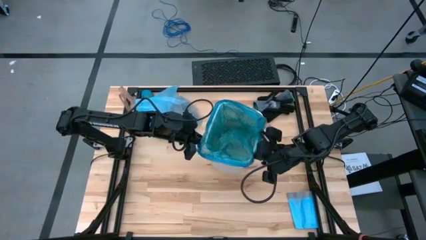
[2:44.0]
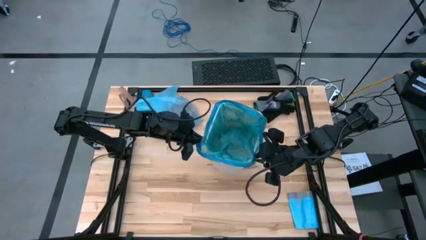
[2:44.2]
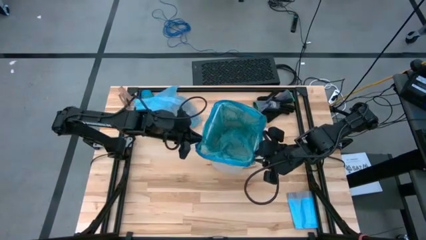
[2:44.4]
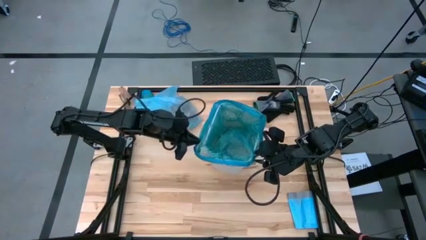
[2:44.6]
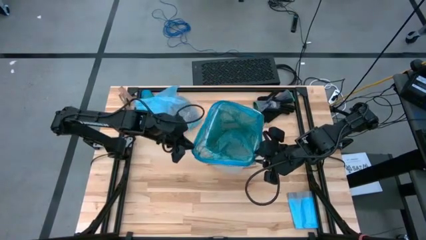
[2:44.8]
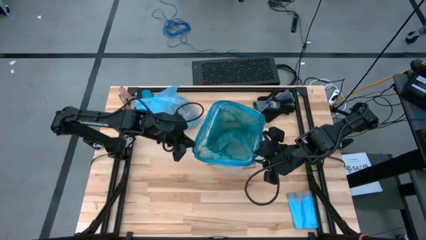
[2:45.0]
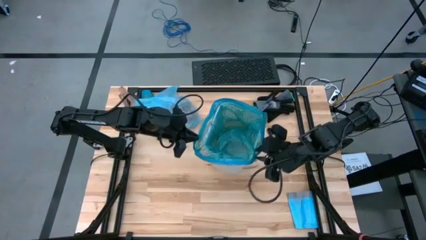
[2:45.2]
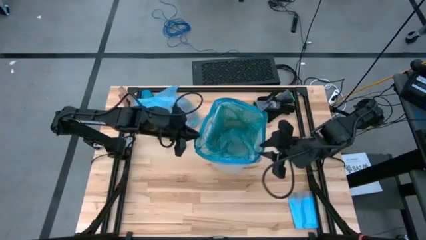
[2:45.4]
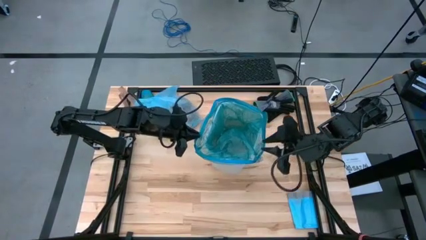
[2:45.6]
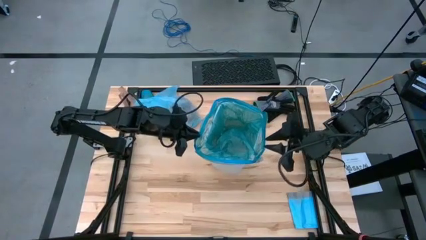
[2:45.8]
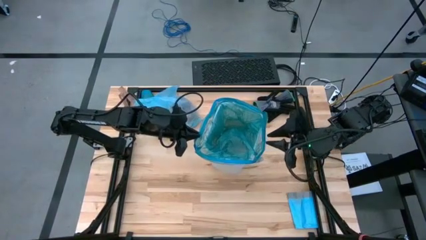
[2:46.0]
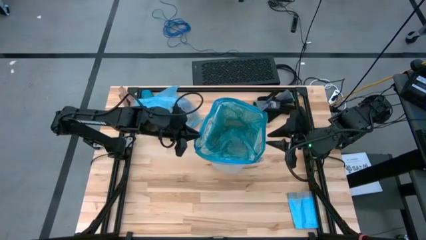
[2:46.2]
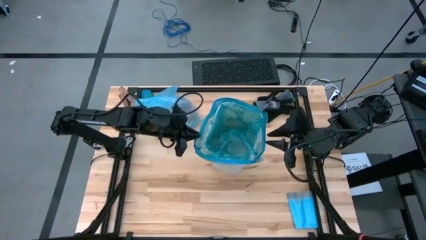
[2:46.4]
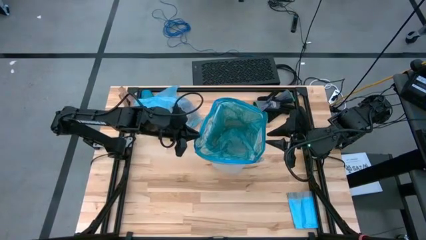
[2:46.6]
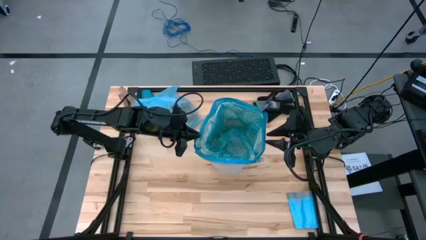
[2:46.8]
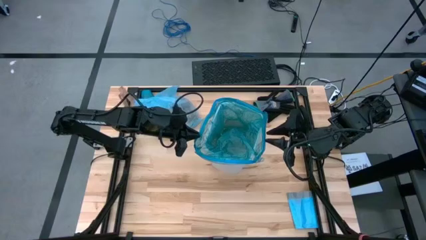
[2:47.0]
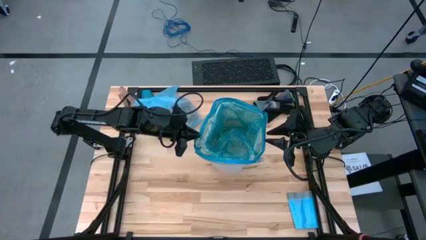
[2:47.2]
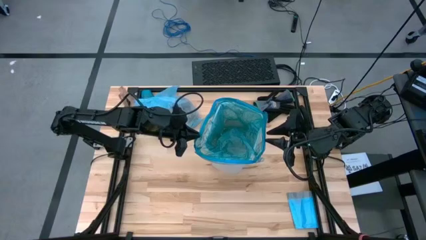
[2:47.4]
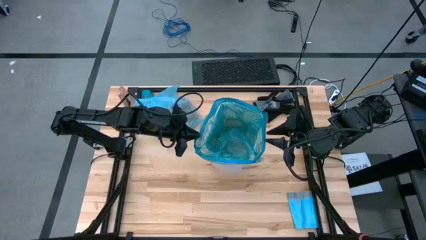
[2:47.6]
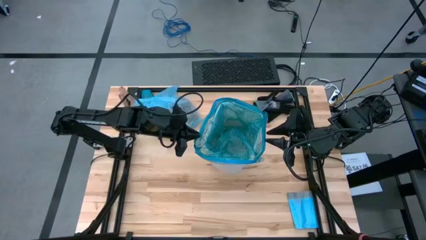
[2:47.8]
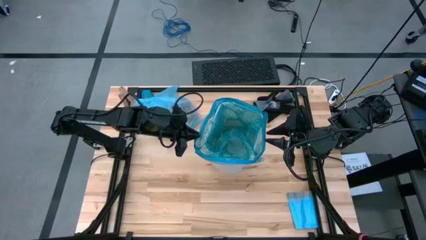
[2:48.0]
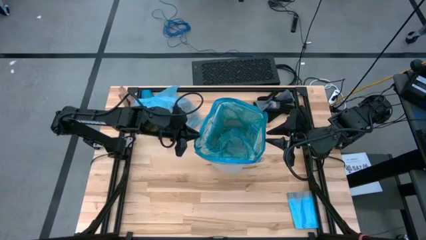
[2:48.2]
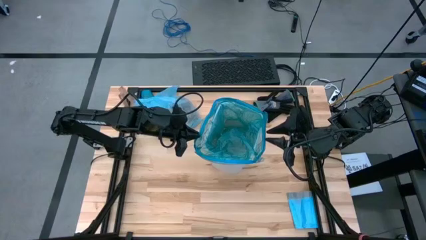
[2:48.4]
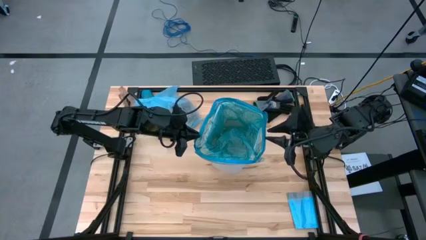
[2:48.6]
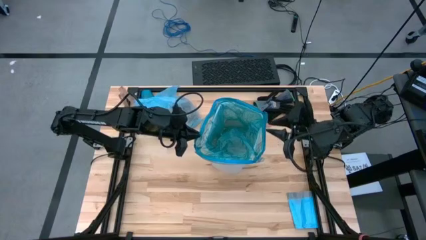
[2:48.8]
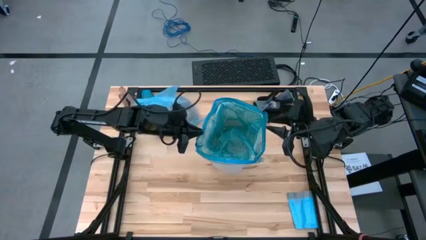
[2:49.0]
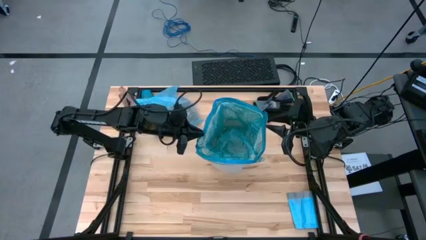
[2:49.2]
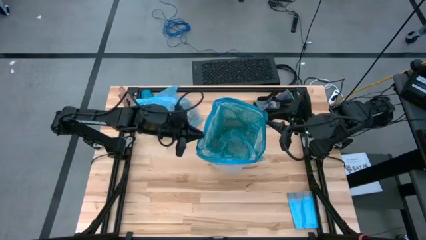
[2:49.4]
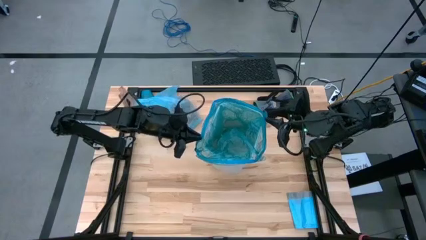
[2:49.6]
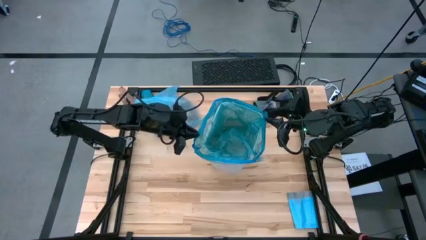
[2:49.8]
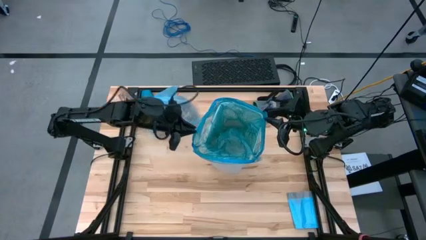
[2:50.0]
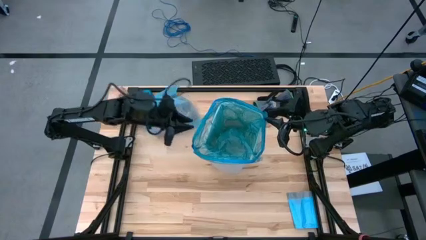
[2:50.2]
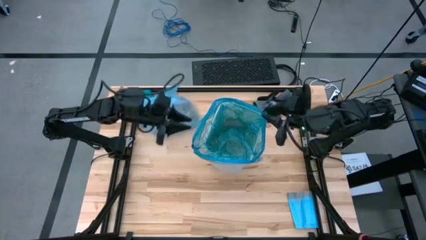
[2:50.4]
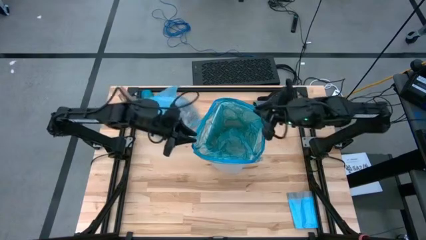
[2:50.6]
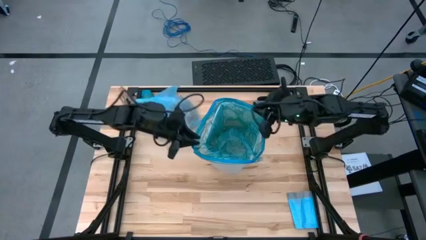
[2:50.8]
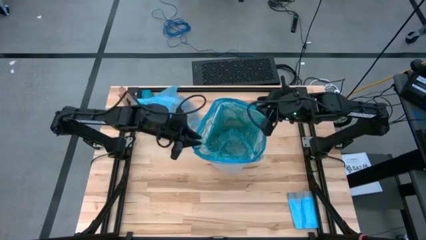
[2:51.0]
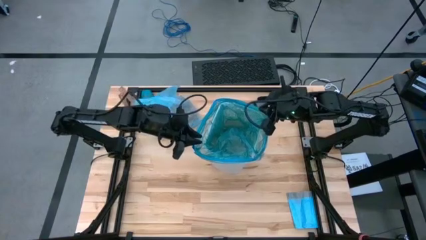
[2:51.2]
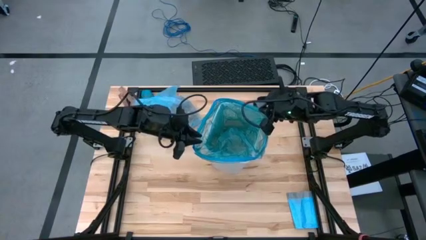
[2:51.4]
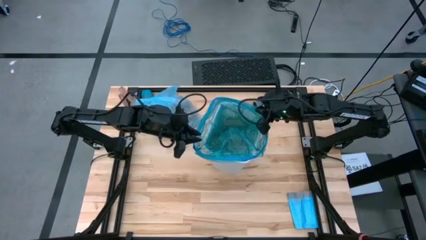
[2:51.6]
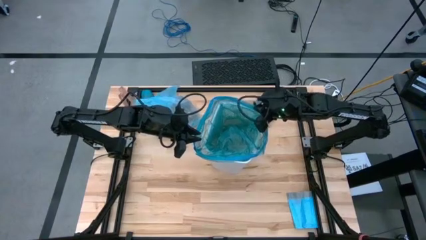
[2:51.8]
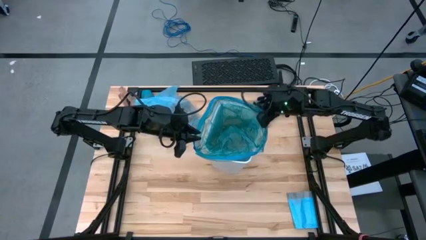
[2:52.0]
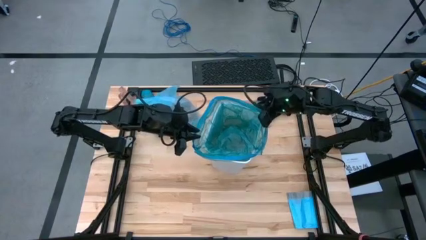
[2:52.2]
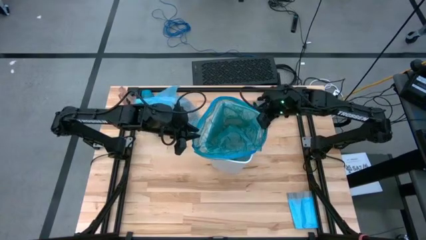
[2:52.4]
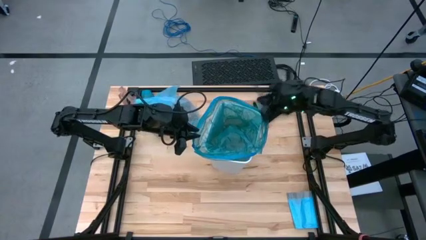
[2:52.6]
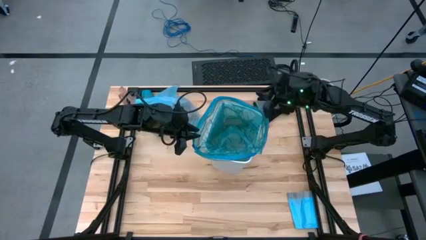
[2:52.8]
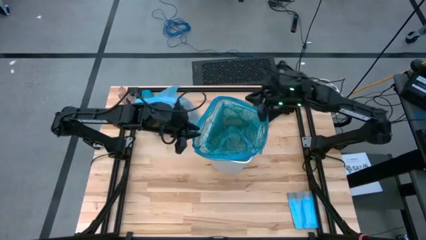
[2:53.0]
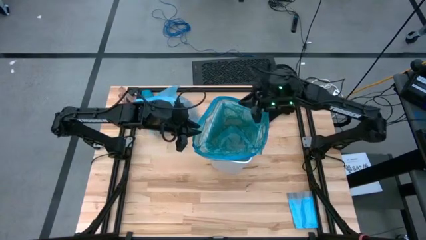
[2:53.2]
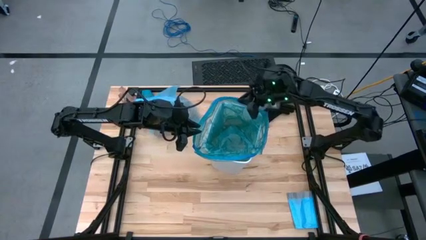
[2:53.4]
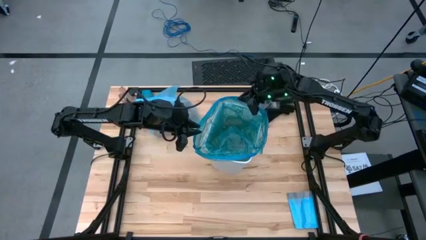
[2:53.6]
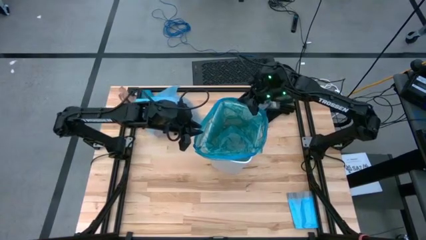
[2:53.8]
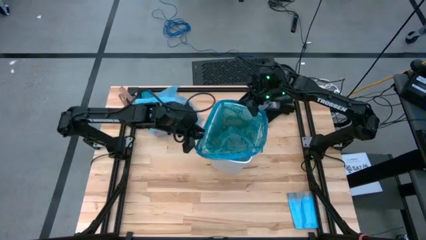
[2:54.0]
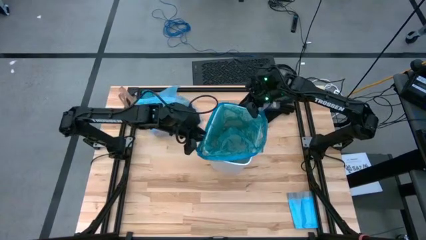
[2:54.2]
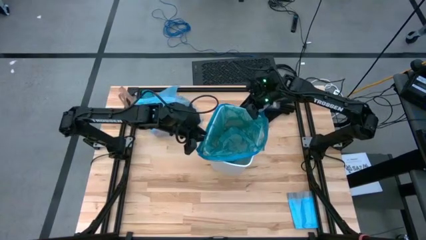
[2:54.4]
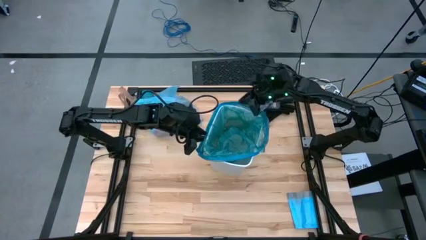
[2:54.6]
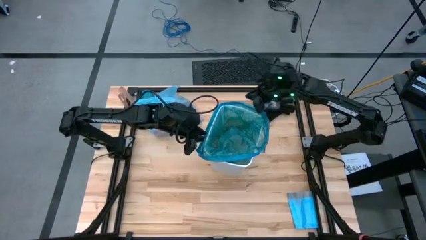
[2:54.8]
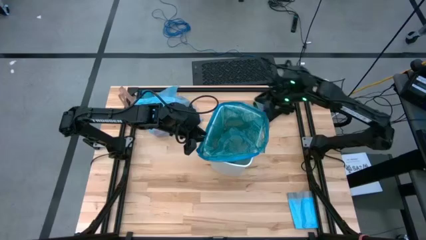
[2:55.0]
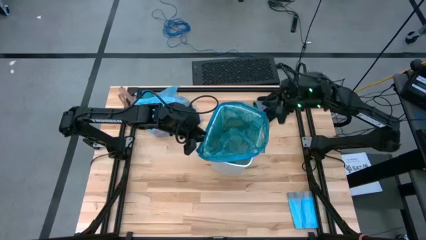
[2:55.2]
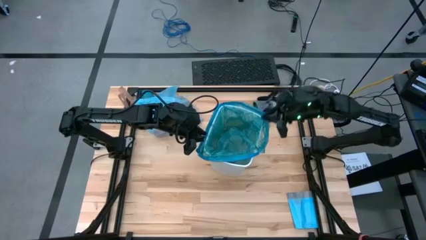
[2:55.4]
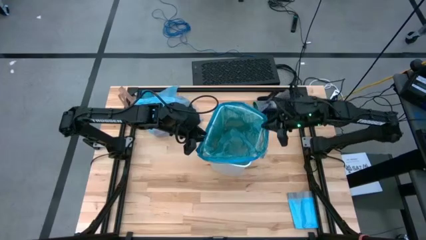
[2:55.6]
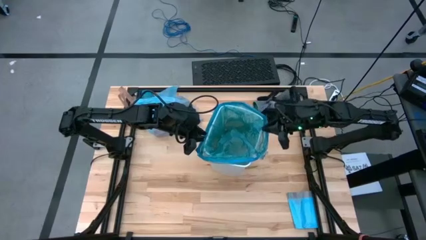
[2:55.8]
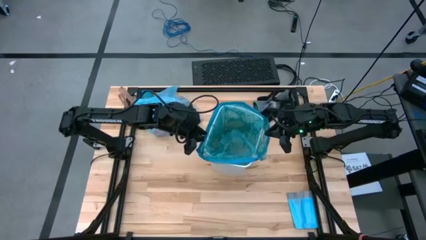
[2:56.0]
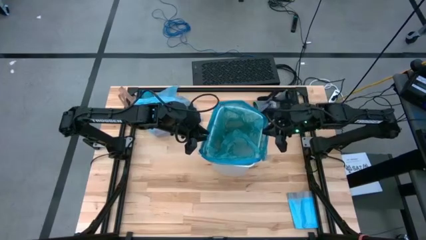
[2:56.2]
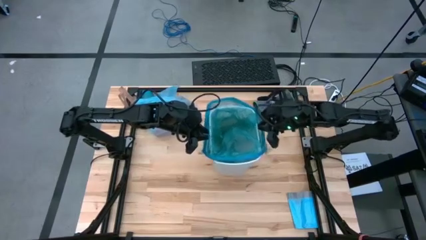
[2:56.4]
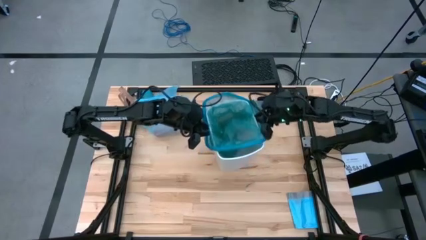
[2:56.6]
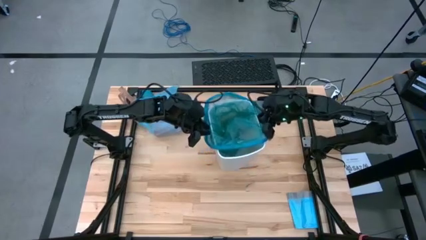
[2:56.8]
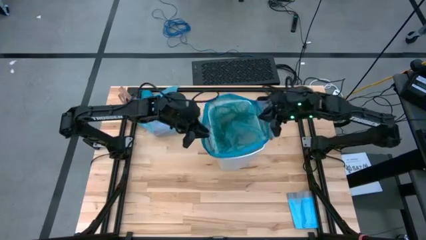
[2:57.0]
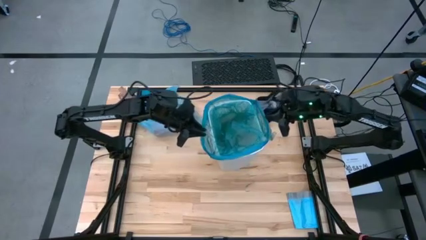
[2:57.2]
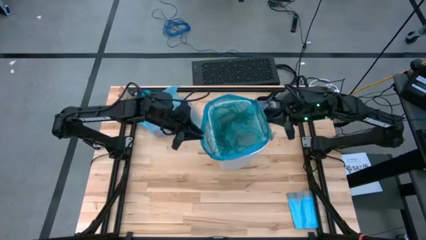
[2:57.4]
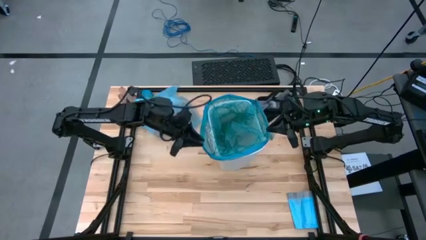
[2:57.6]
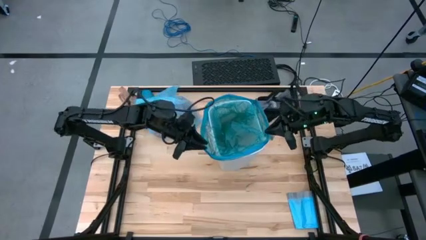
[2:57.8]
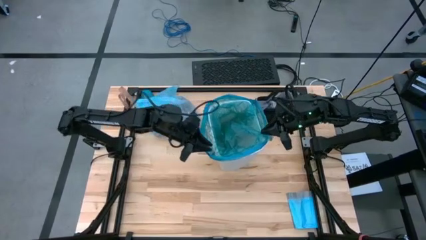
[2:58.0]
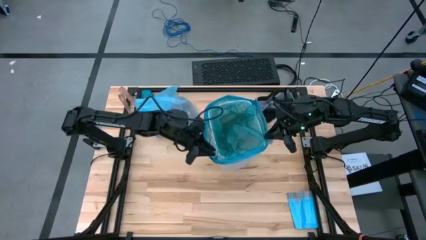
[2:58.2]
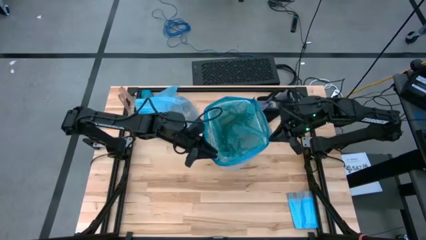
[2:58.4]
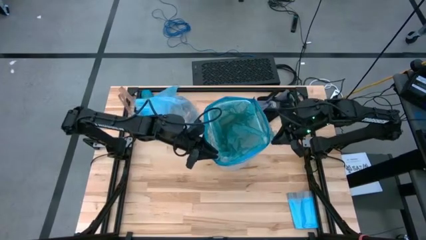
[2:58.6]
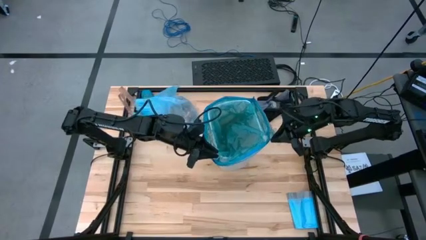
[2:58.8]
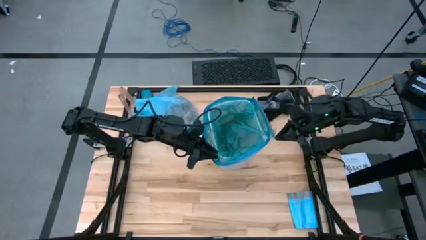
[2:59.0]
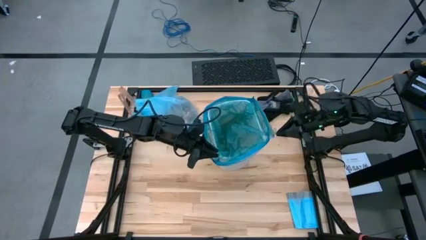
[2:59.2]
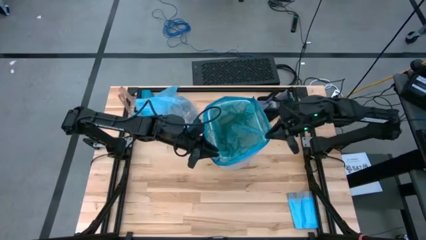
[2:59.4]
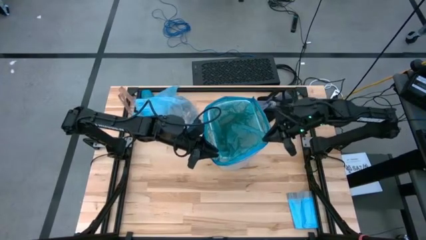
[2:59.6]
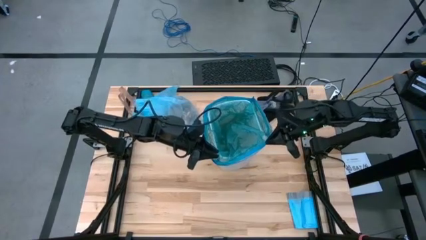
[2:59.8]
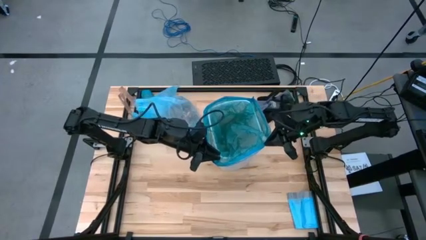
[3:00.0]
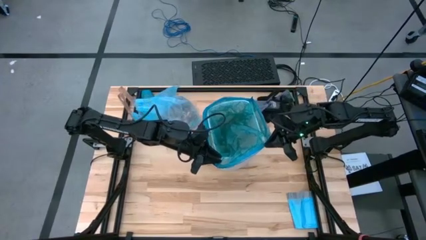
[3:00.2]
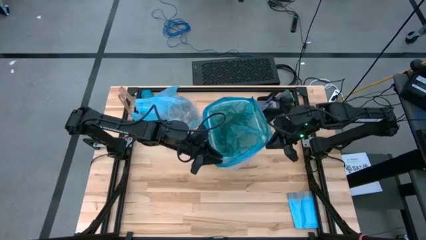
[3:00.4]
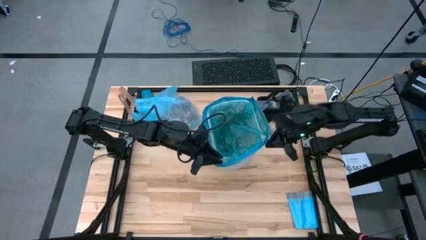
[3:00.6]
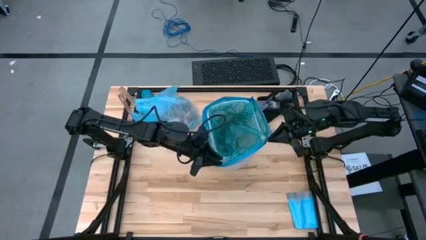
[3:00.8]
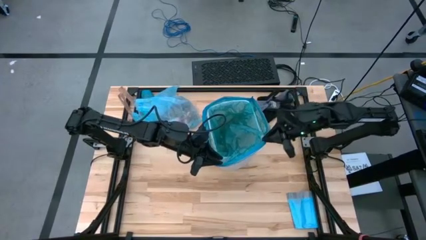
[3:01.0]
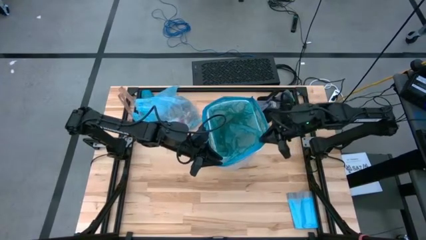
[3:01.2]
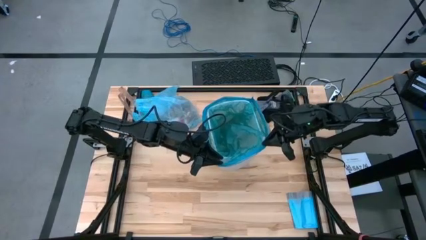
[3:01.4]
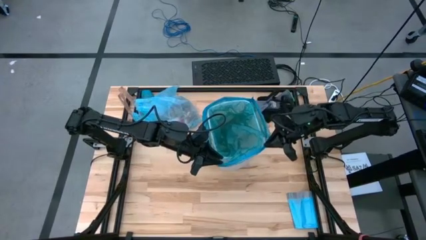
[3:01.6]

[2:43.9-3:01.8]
Task: place trash/remove bag and relplace
Insert the blue trash bag into the white trash bin
